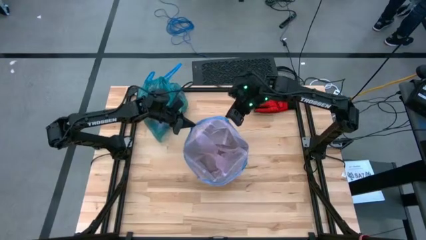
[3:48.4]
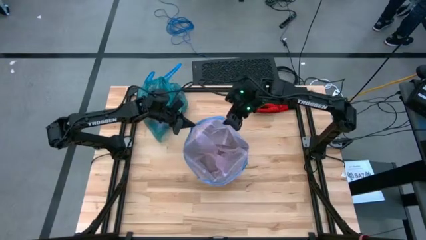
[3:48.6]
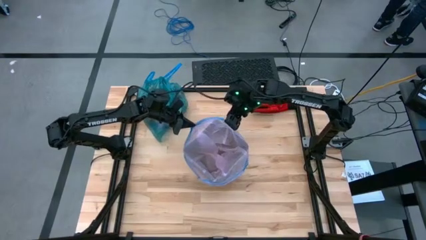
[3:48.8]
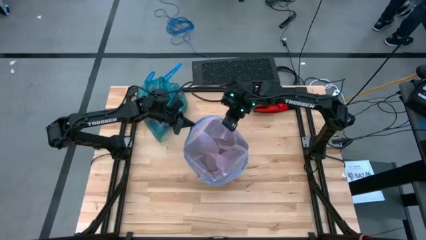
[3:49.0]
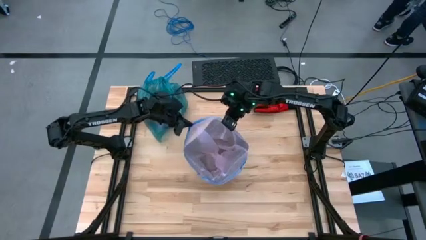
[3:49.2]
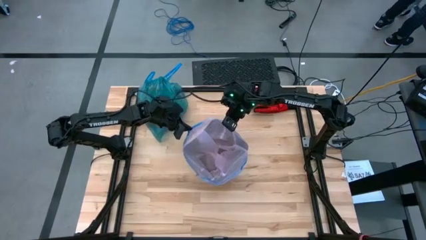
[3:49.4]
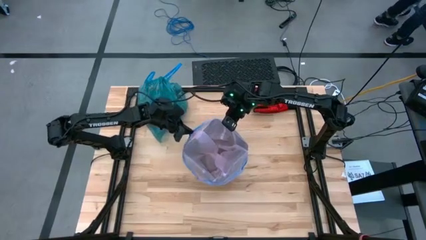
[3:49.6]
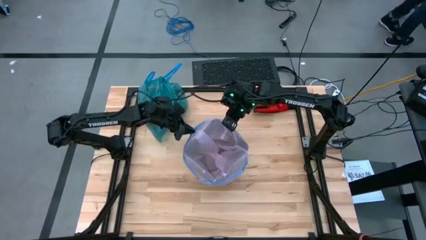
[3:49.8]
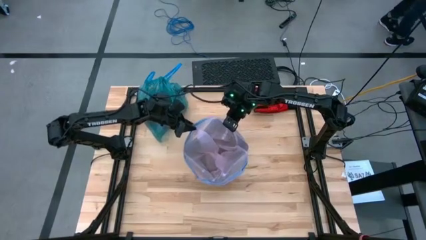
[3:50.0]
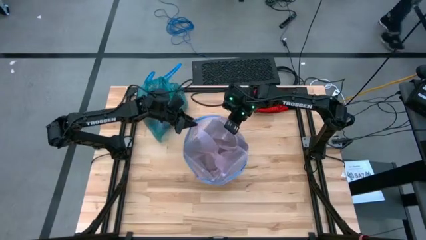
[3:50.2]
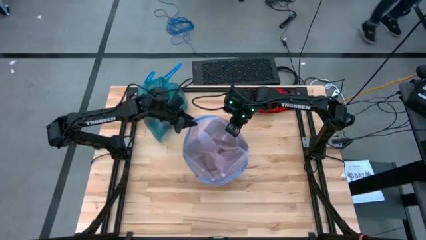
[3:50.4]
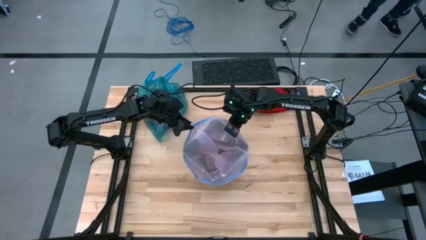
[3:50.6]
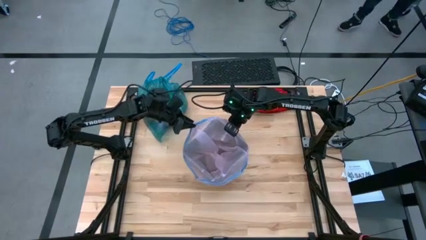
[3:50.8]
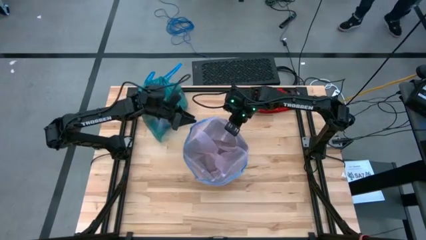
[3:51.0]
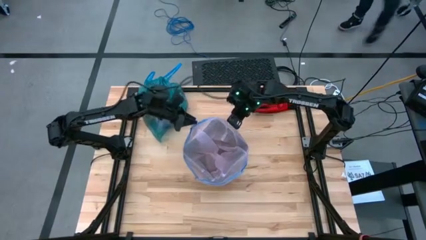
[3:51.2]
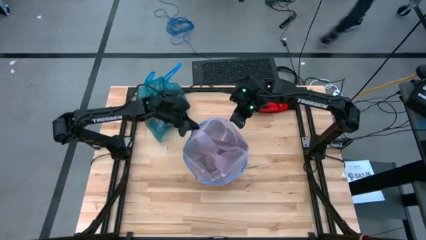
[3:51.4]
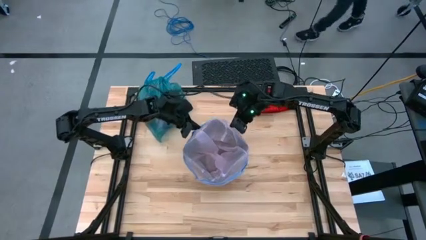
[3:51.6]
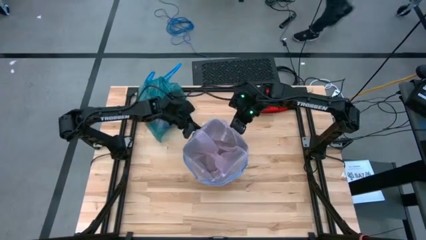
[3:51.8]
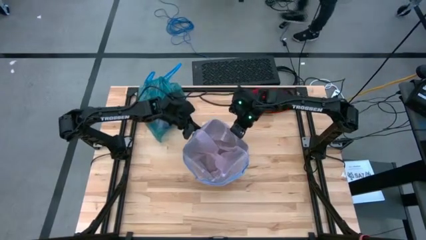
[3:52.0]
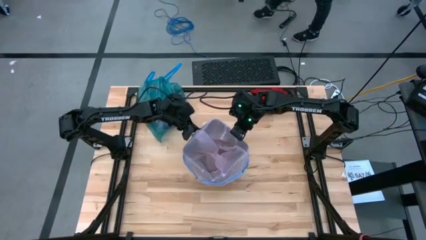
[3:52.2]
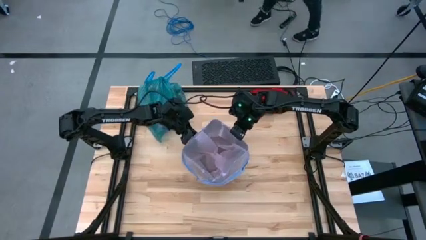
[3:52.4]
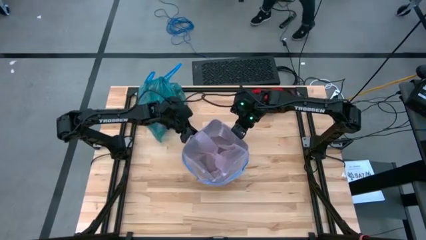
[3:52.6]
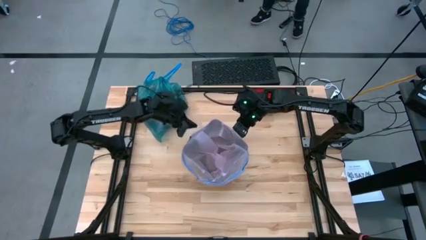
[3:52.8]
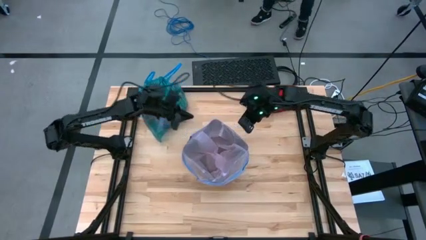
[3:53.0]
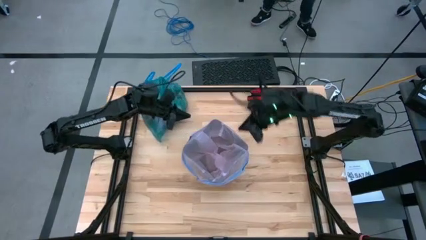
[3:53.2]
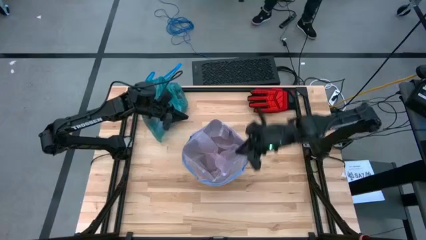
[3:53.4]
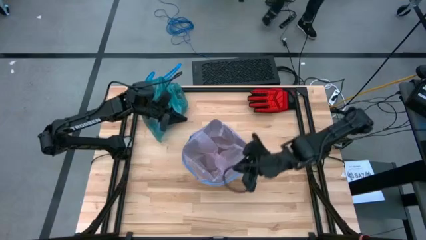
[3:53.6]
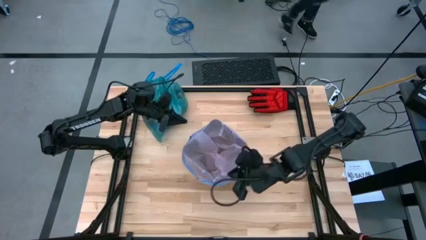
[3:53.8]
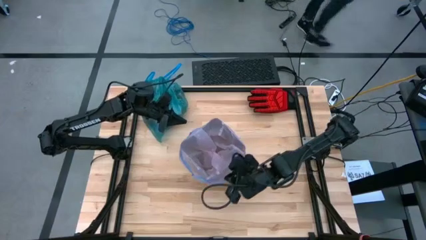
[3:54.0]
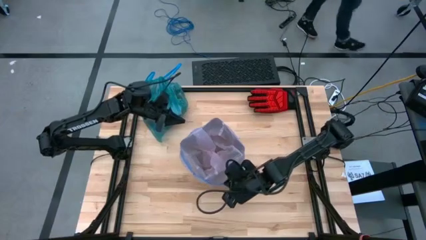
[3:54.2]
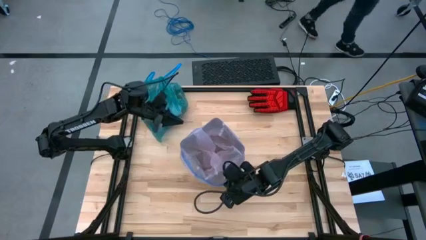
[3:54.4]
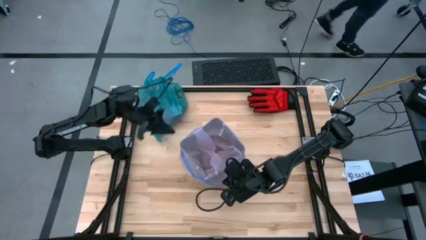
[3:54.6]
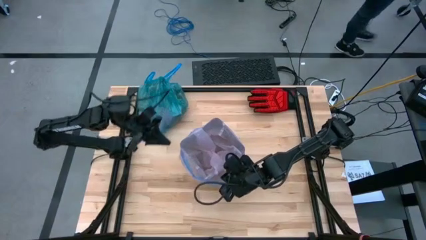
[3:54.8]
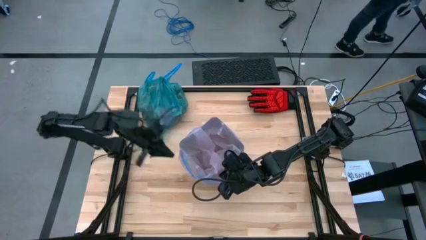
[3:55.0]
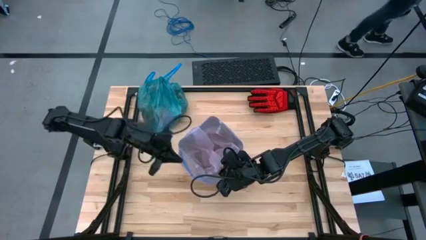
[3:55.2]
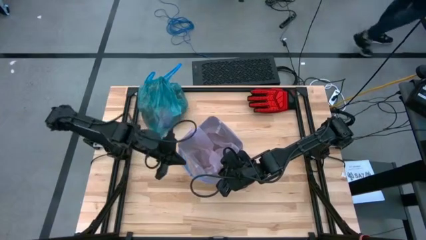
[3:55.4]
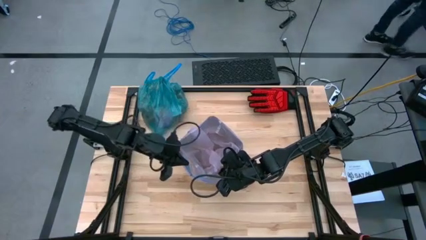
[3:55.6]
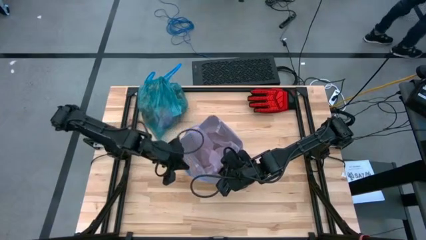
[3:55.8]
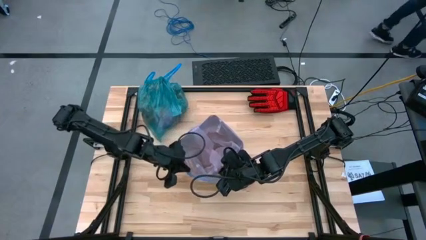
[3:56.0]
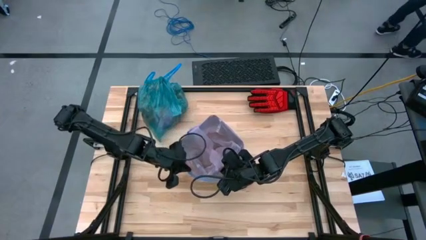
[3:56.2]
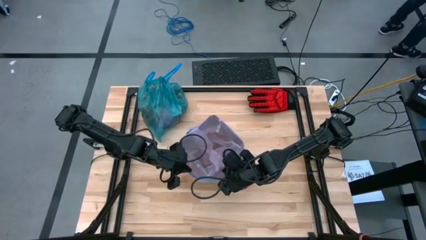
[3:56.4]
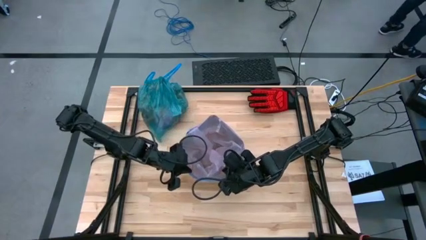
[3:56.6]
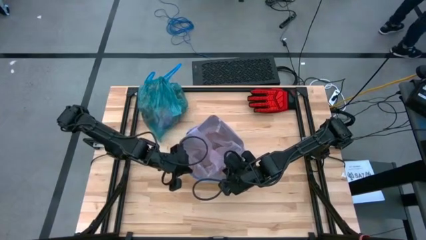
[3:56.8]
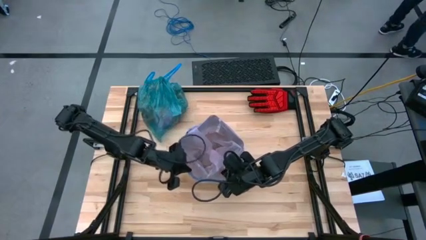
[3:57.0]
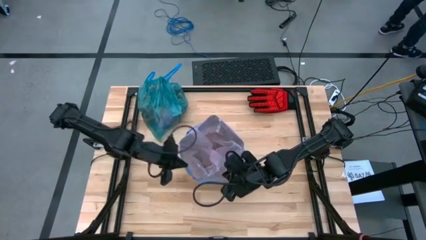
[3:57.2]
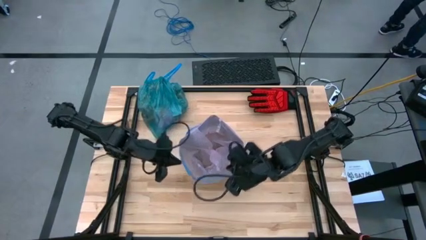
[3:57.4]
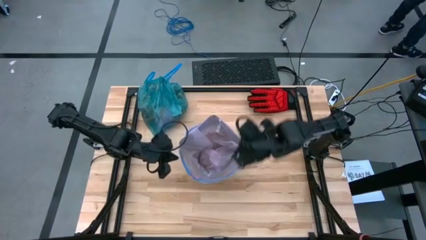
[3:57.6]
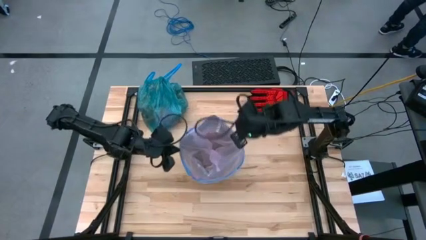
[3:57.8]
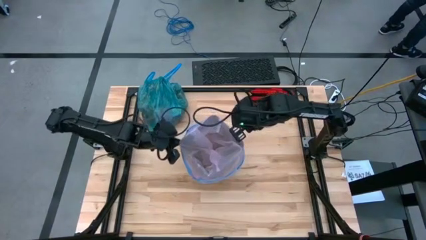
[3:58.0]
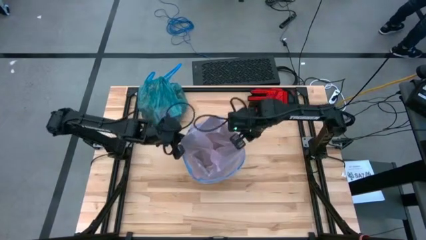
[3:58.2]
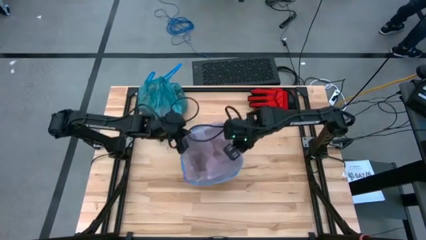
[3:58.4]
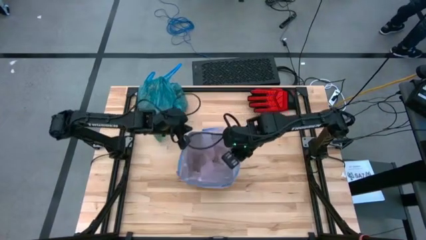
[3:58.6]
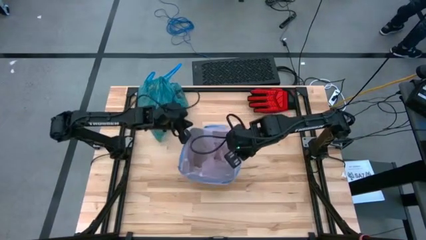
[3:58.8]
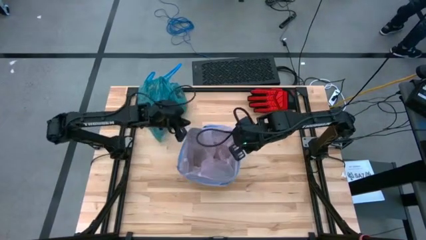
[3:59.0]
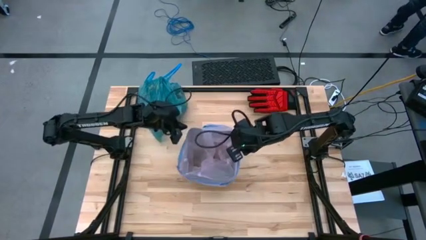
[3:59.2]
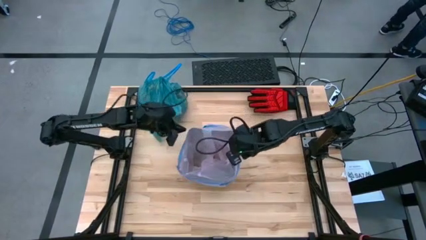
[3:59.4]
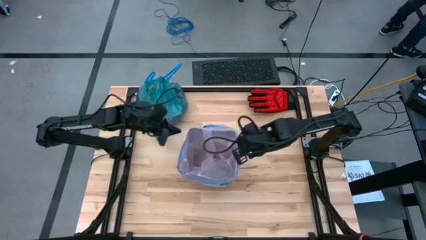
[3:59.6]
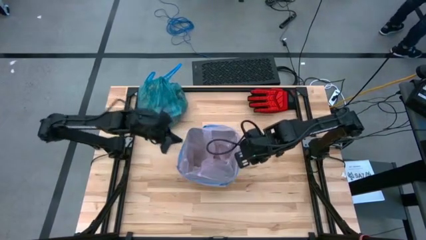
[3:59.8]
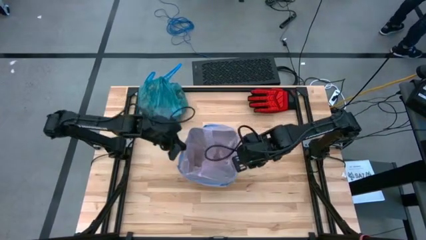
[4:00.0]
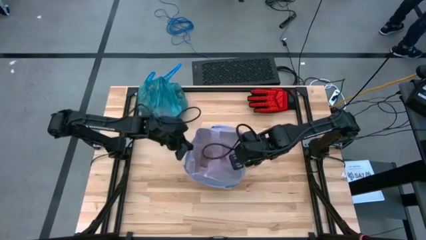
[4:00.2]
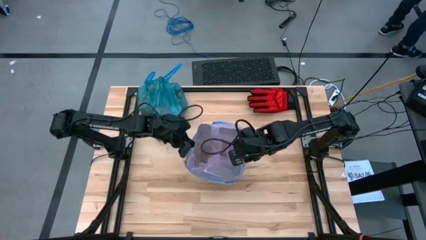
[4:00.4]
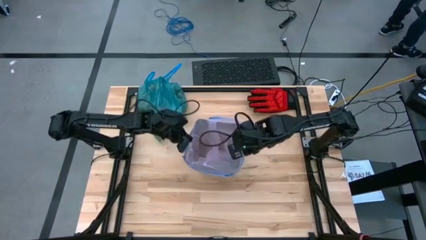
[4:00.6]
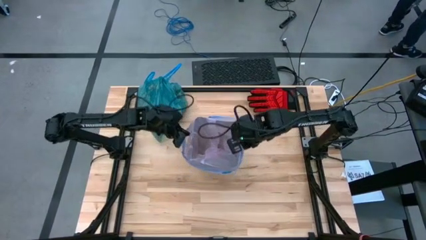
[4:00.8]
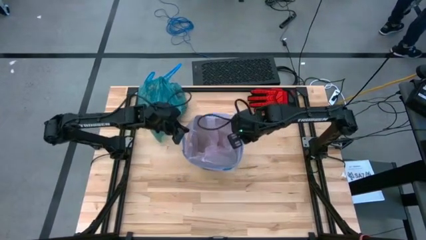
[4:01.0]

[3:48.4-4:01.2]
Task: place trash/remove bag and relplace
Insert the new pink trash bag into the trash bin

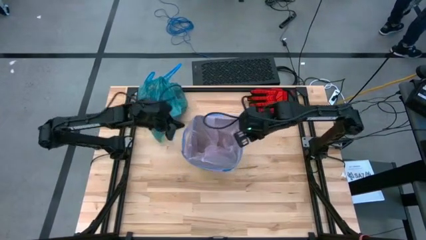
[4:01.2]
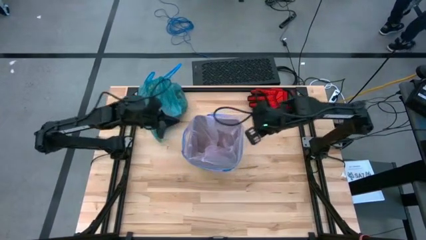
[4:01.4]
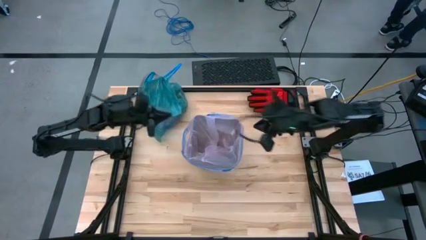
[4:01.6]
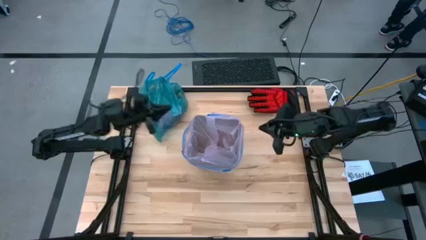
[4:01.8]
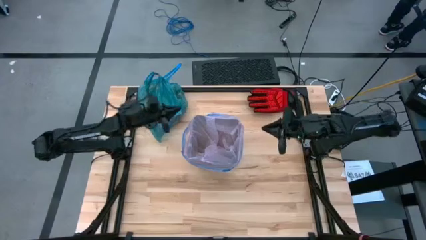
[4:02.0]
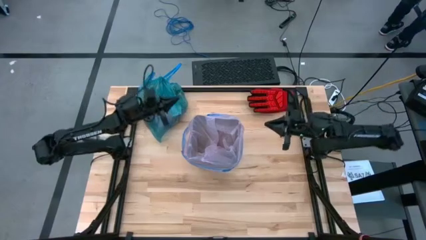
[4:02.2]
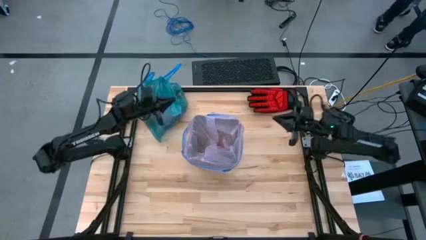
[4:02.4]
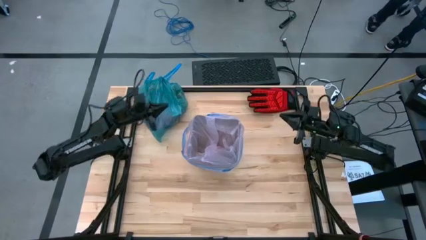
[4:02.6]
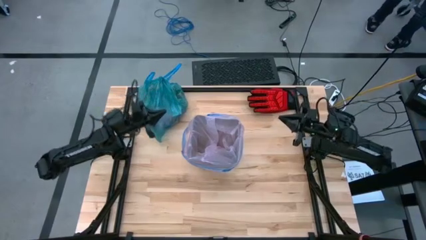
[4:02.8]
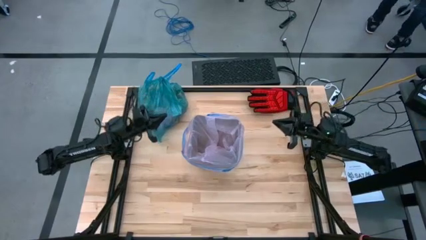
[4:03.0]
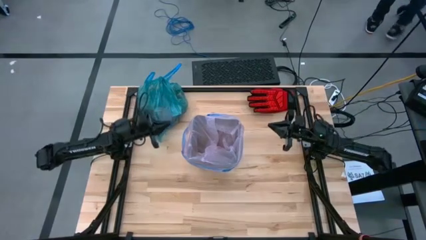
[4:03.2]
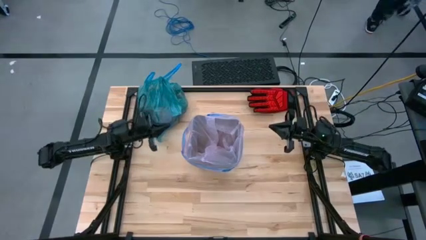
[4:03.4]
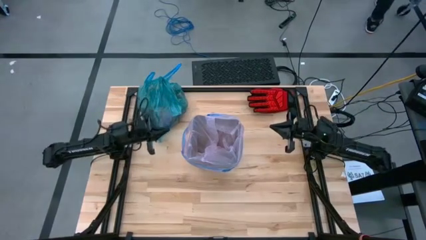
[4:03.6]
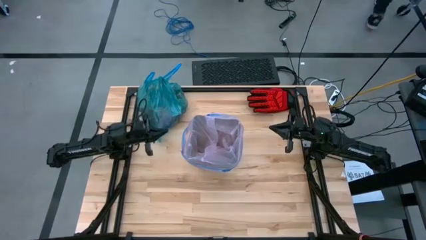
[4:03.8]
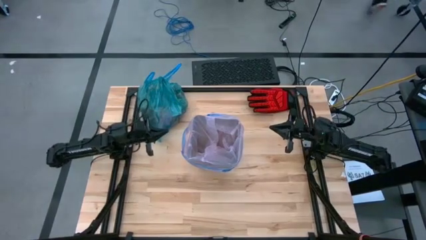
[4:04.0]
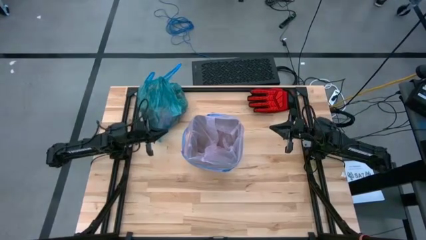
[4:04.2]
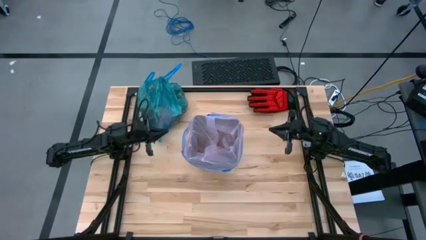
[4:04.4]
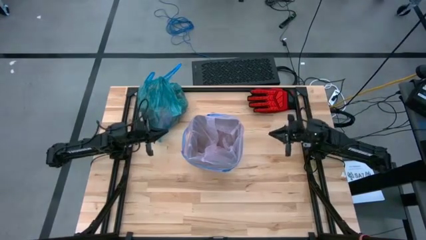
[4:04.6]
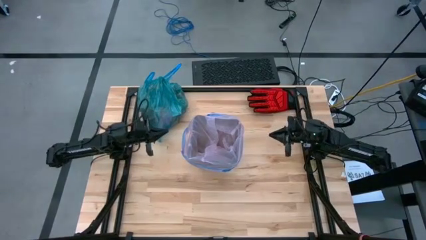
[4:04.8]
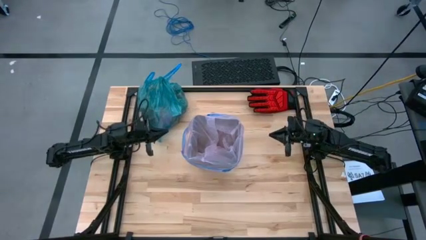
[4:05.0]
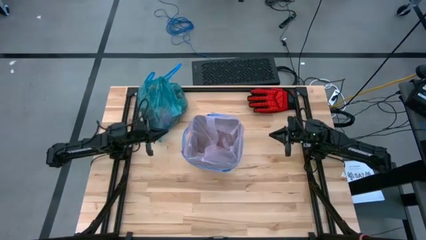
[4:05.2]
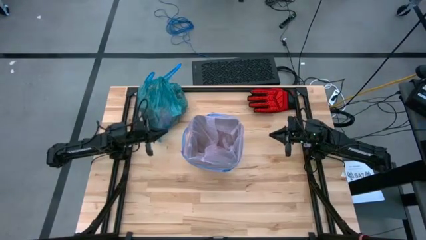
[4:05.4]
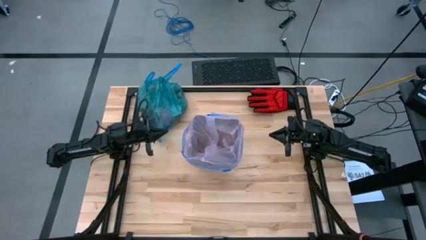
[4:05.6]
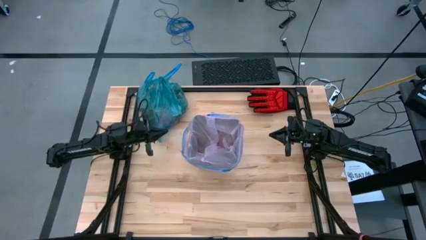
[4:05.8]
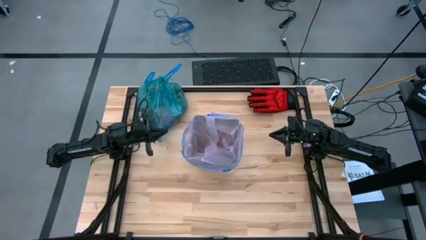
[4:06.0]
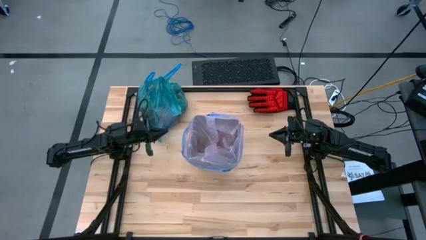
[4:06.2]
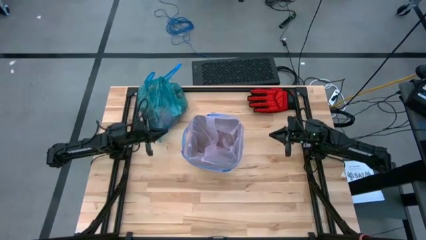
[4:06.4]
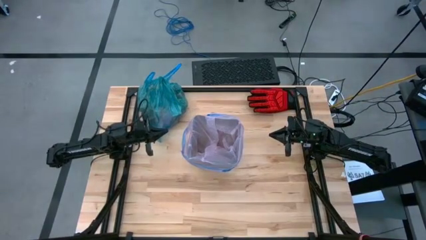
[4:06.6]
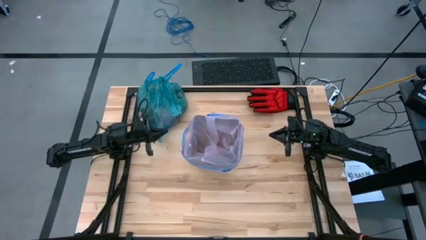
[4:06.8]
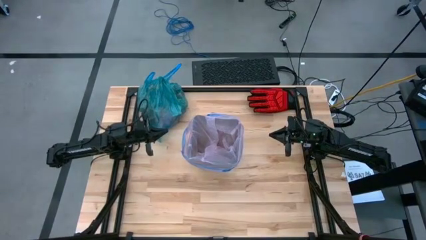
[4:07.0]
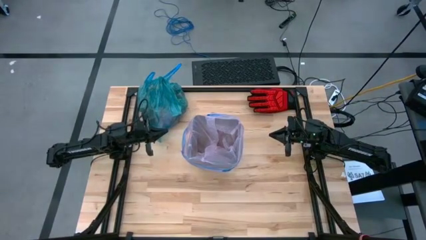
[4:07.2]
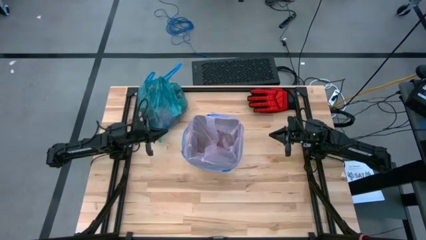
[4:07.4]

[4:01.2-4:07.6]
Return to Home Position
